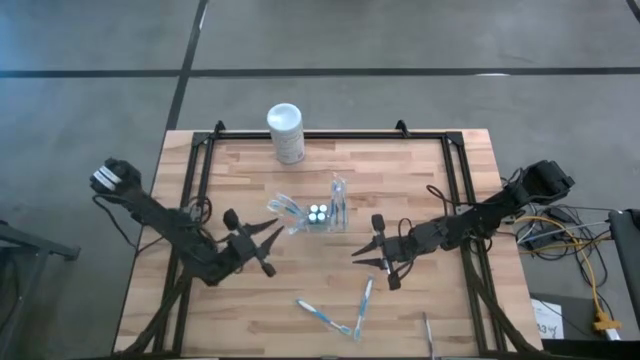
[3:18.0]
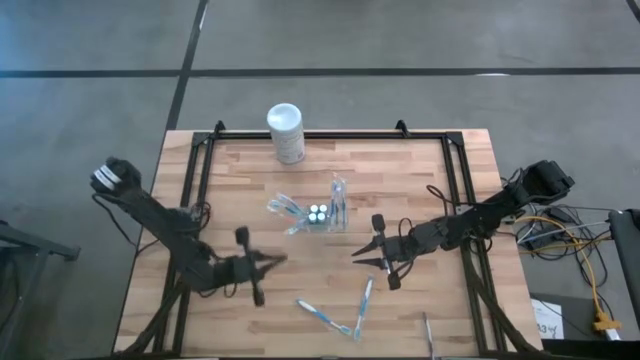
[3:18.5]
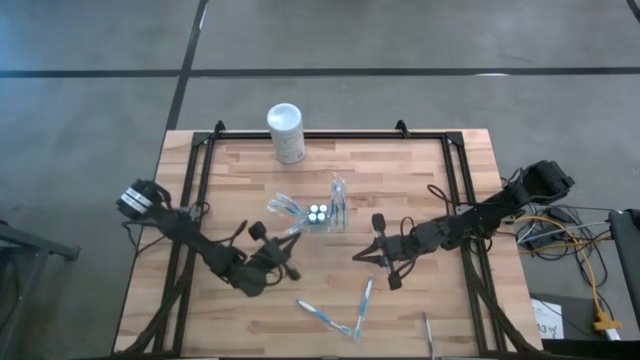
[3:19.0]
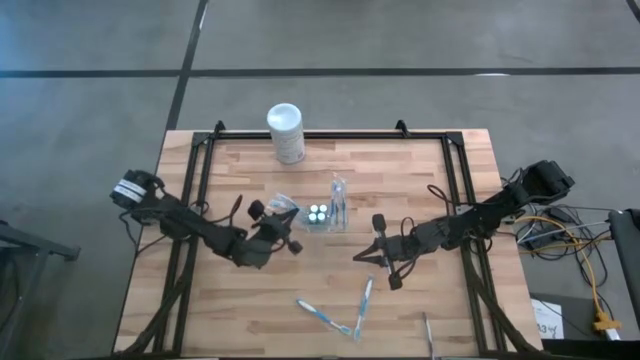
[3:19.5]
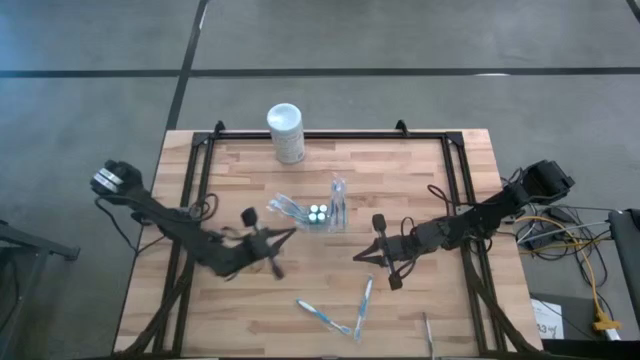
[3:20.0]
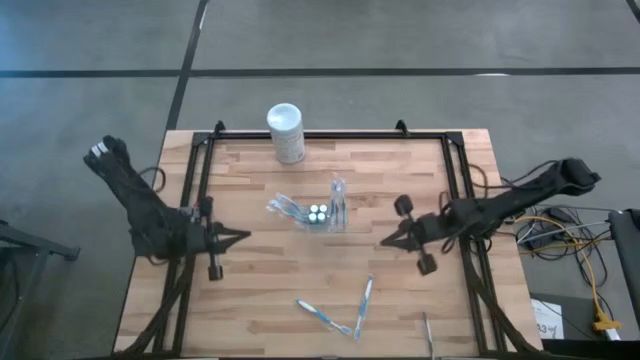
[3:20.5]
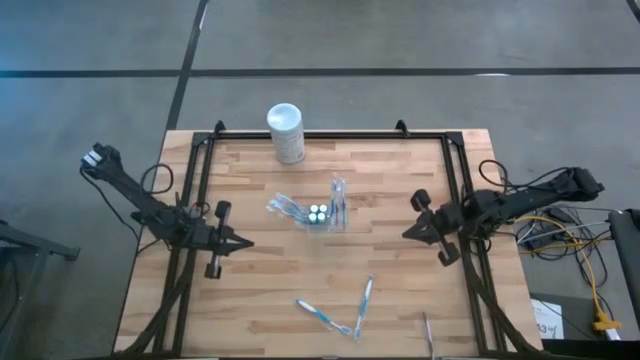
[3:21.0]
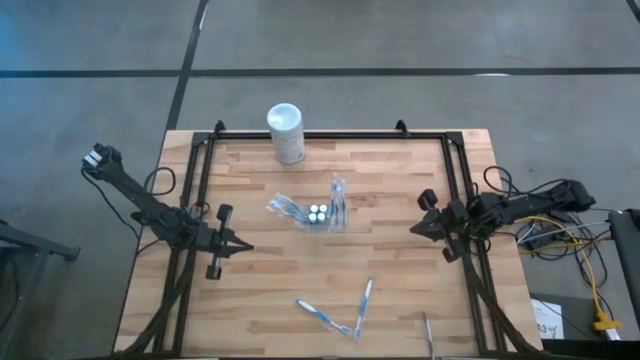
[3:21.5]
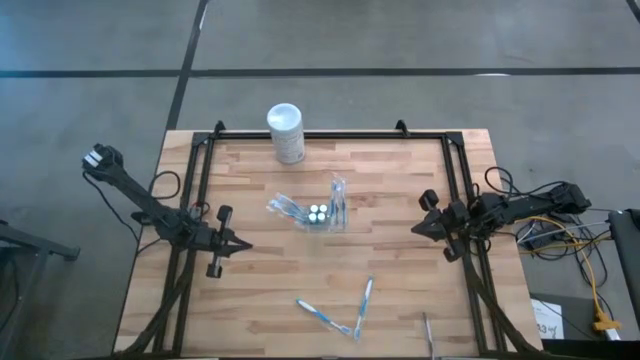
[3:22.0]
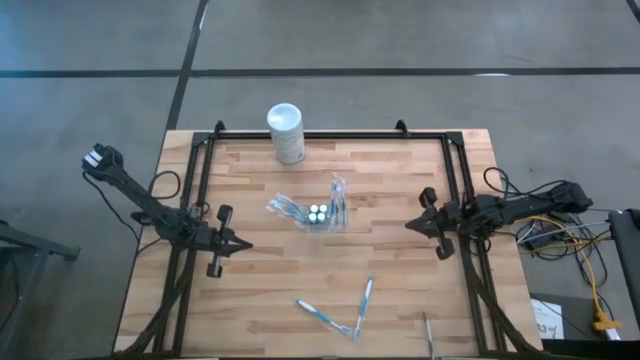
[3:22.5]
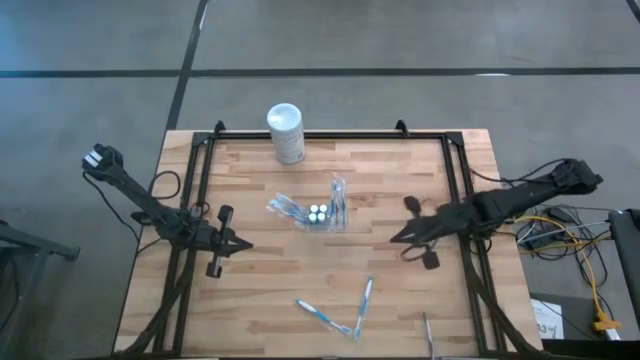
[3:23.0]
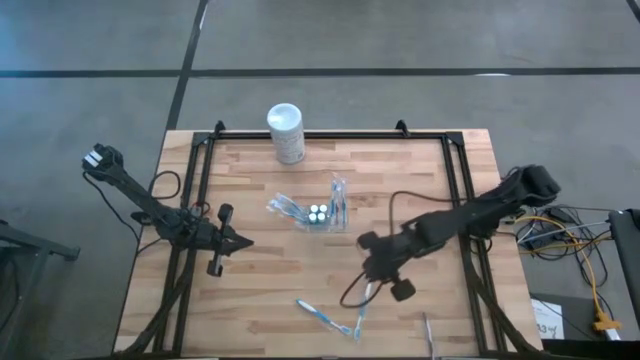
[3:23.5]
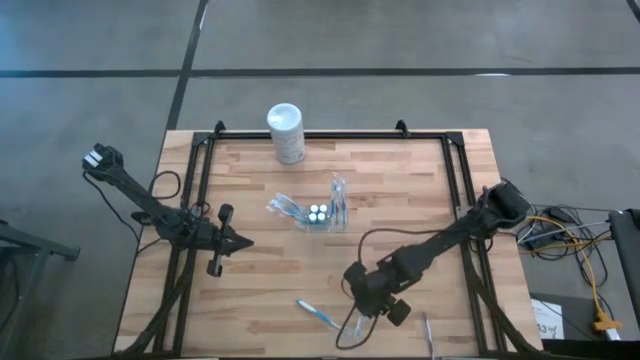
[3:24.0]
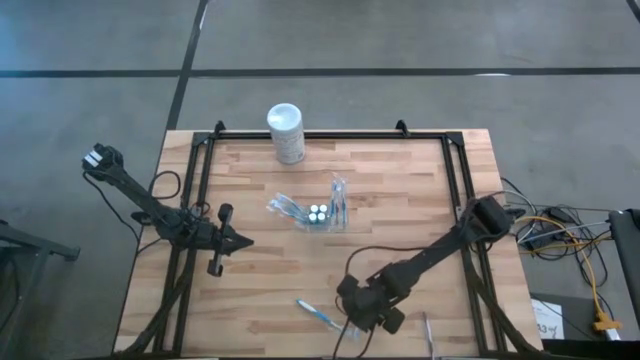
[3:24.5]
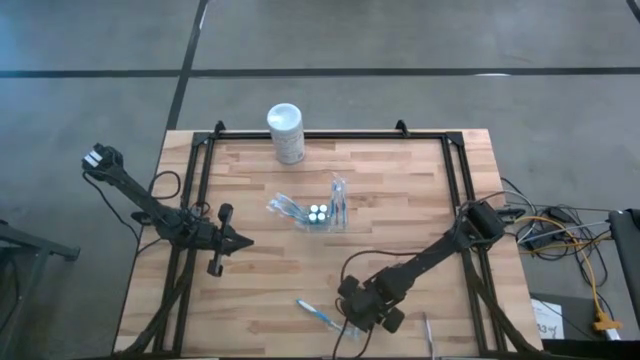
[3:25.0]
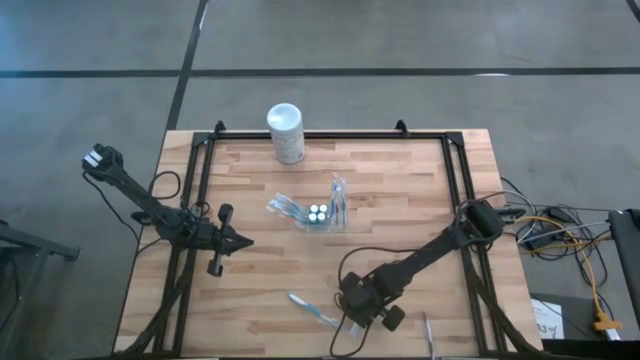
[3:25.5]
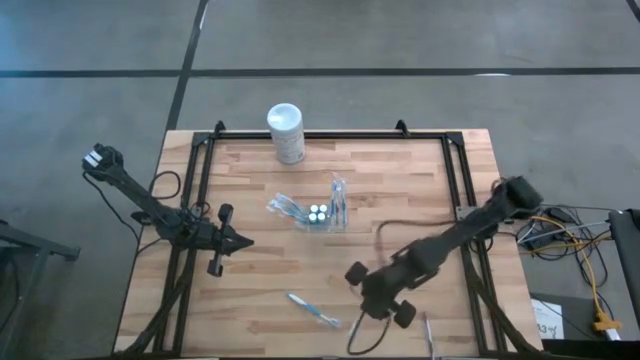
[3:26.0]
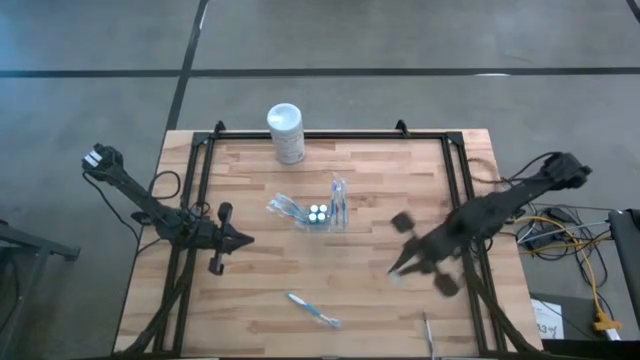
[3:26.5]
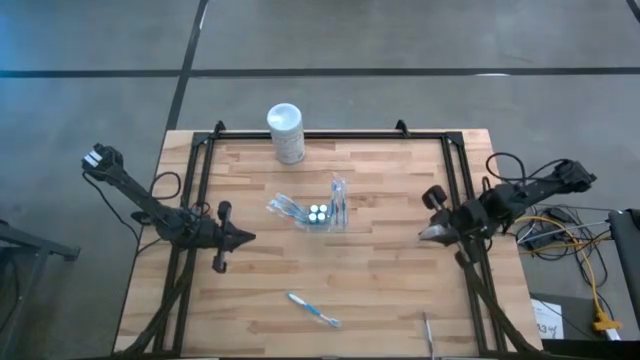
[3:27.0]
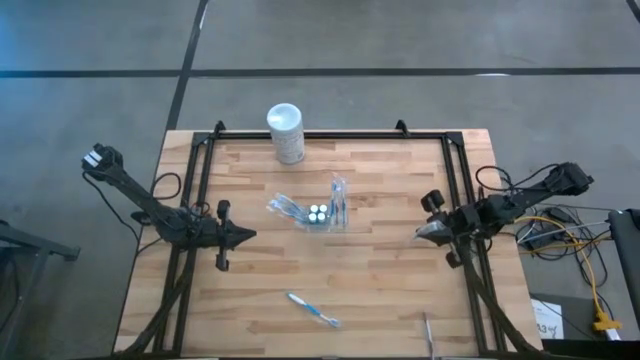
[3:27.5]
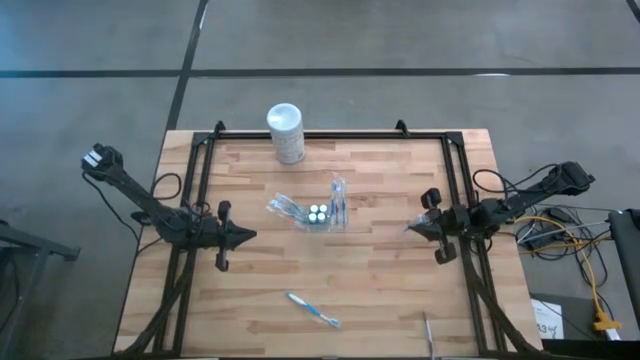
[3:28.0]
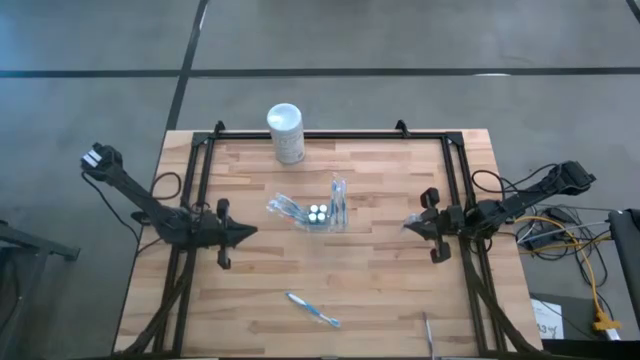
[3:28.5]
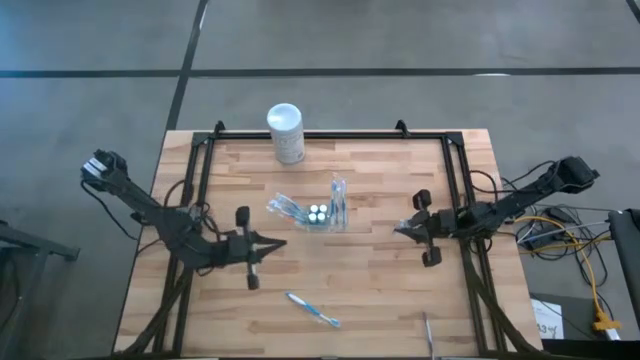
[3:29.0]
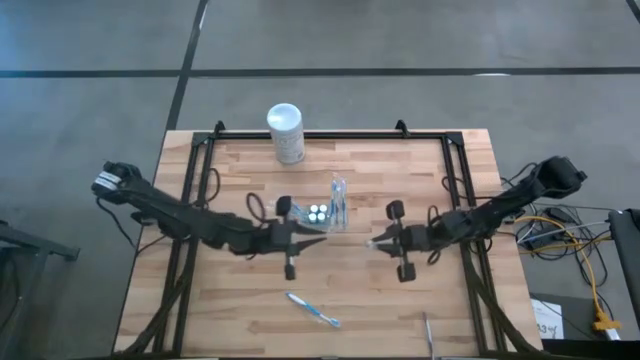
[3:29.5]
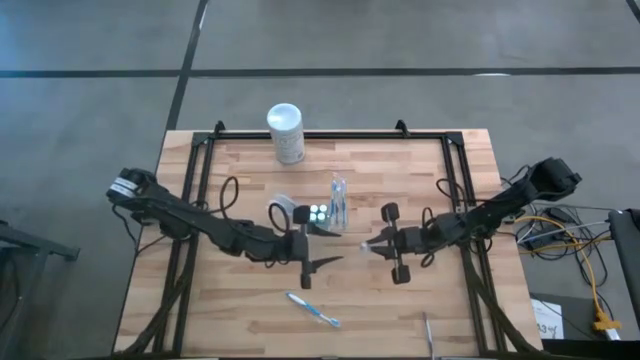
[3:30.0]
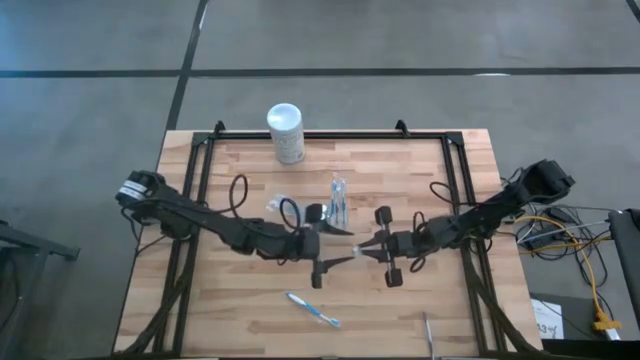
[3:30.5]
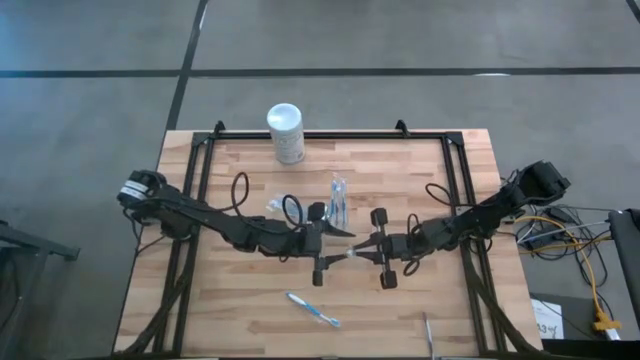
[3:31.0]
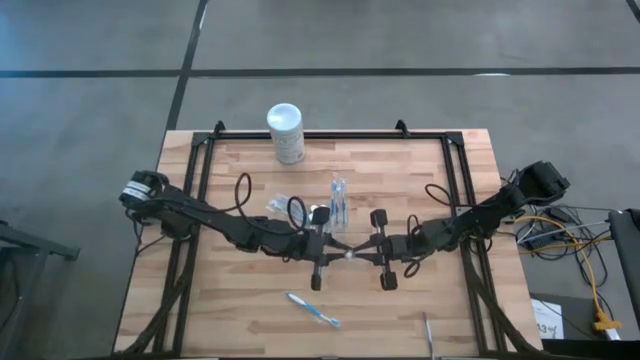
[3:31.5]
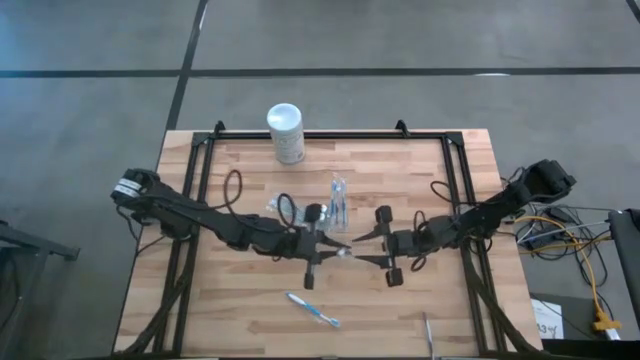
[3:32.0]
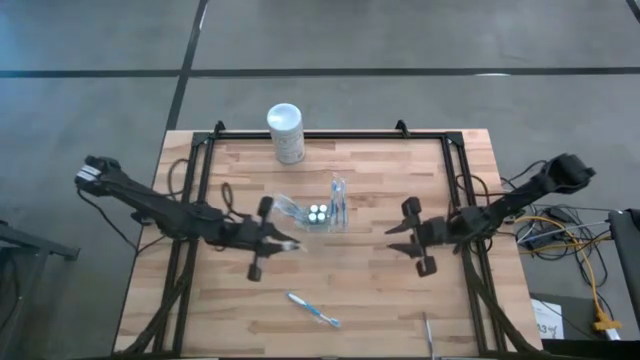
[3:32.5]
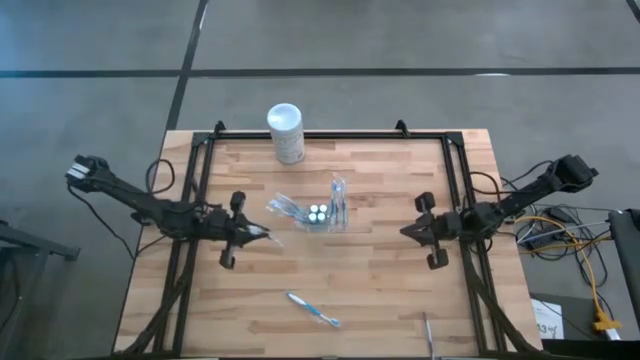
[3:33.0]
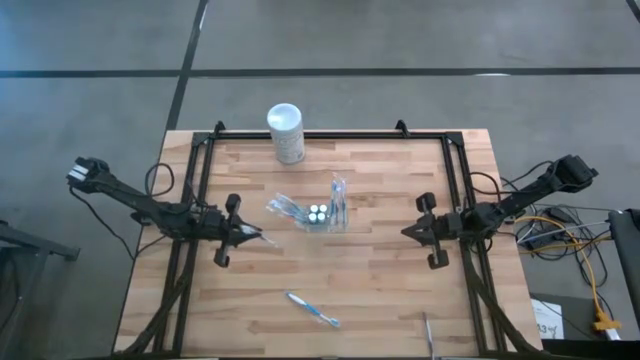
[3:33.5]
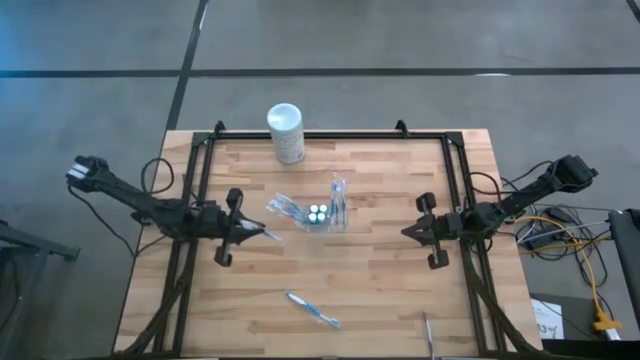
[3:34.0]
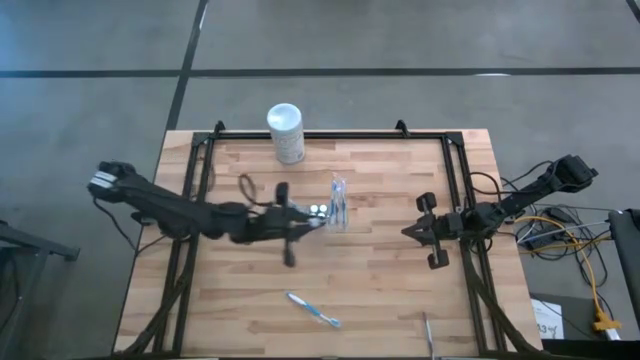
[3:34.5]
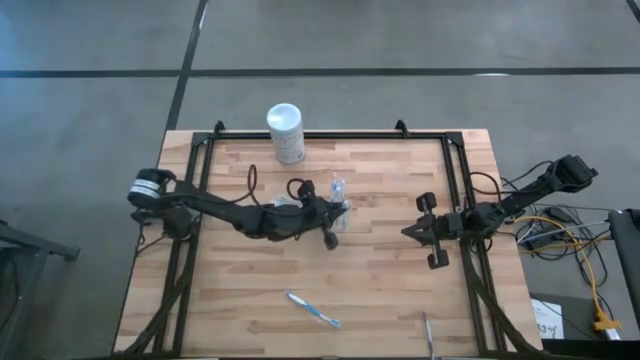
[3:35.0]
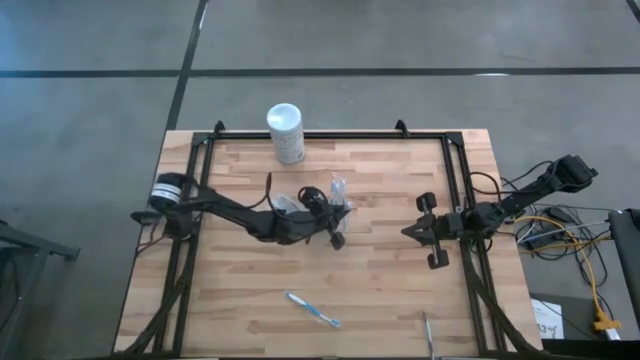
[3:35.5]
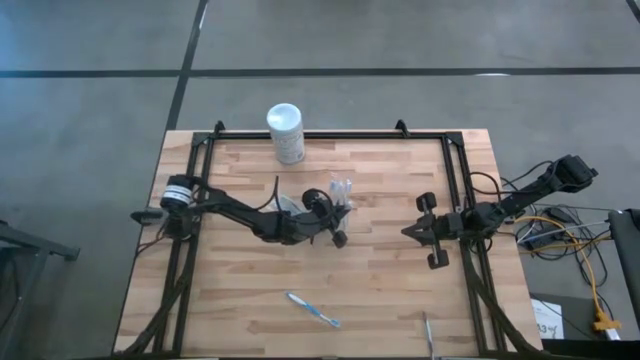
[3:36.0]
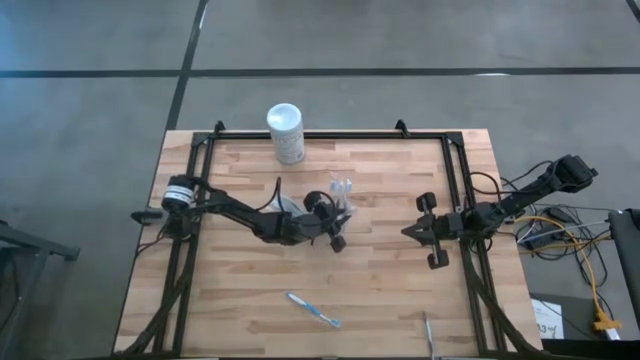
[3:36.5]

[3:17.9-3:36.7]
Task: Pick & Place toothbrushing station
Put the blue toothbrush into the transparent organizer

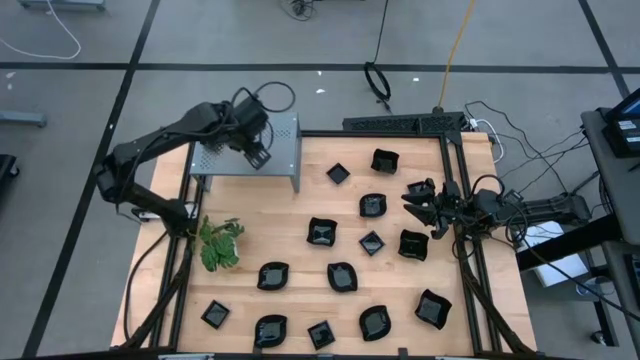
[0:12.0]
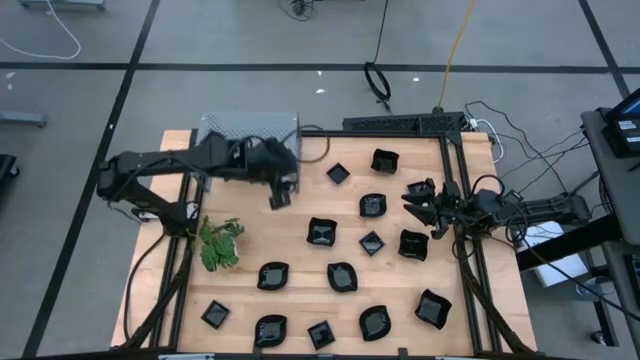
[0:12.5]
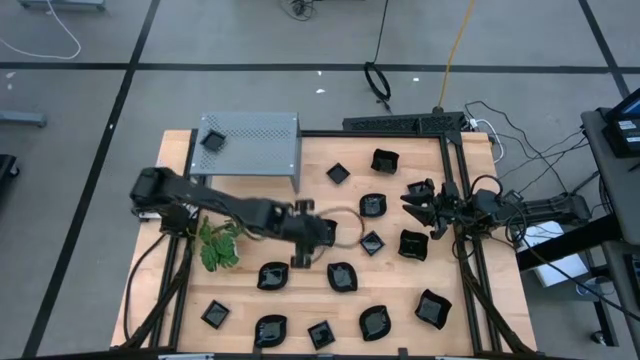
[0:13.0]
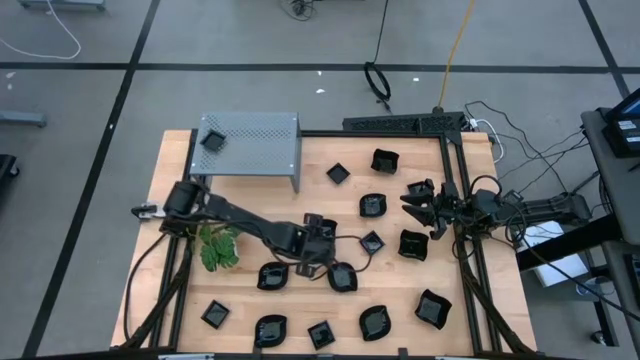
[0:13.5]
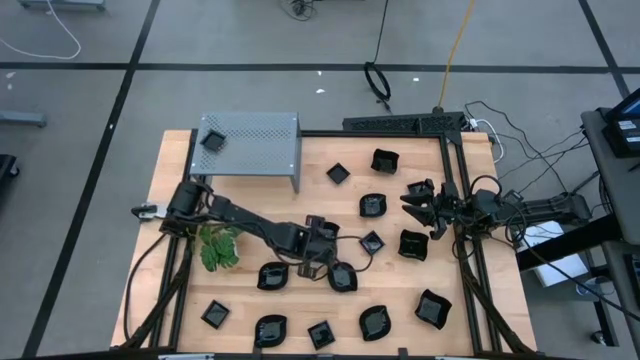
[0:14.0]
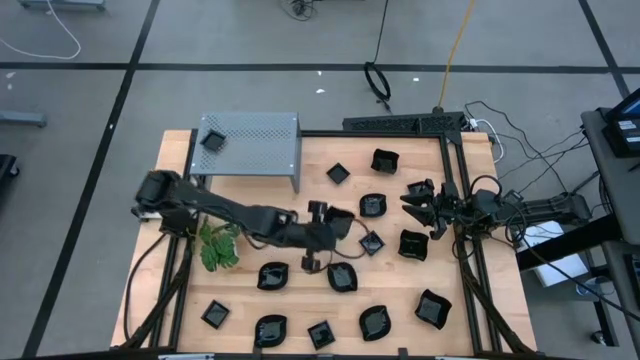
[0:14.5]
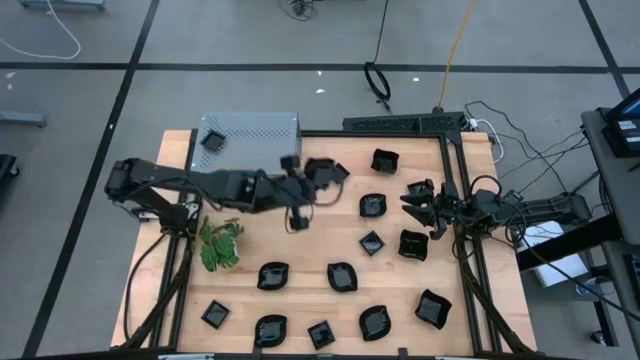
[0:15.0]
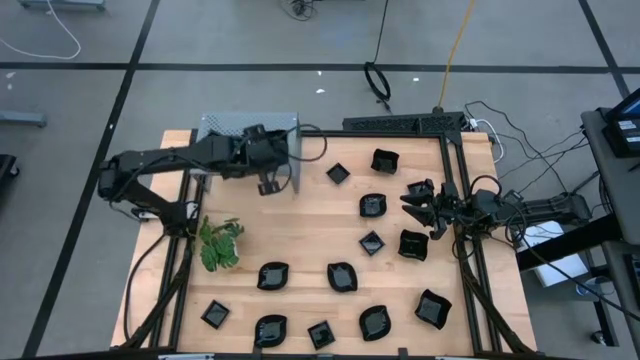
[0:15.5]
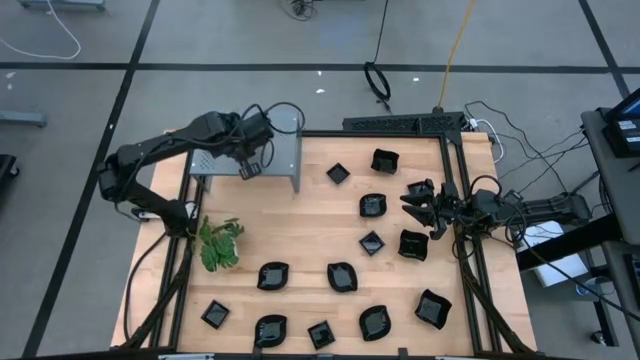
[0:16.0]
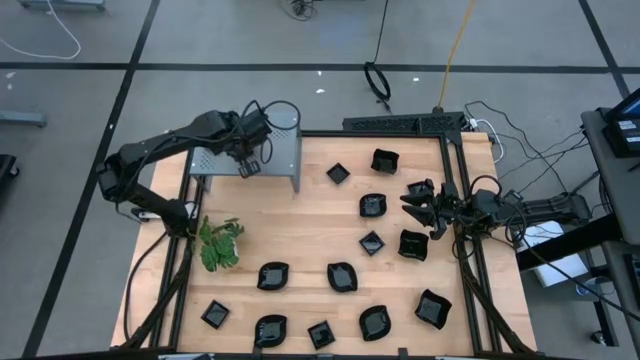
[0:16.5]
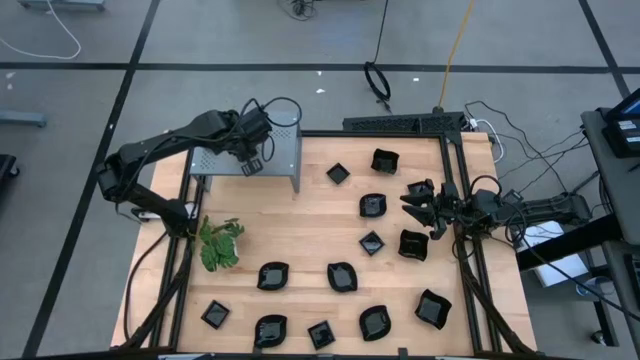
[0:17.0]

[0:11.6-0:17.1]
Task: Pick & Place Mini shaped plates
Put the distorted square plate on the shelf
